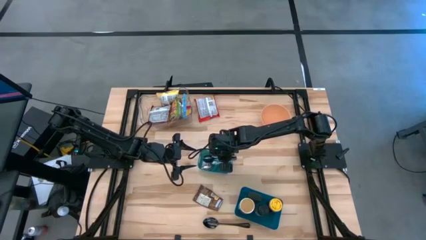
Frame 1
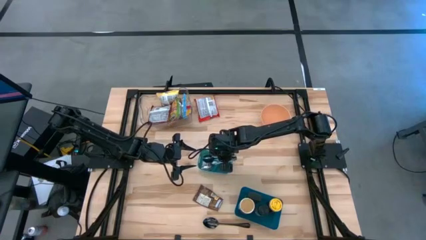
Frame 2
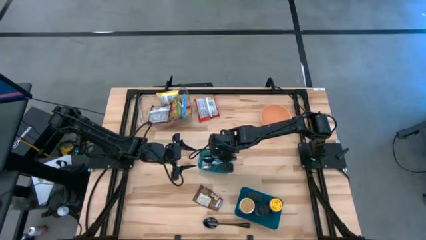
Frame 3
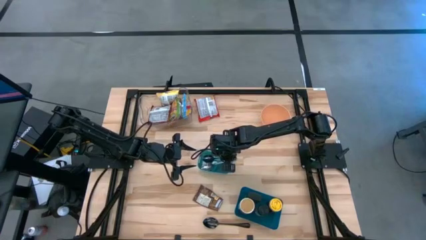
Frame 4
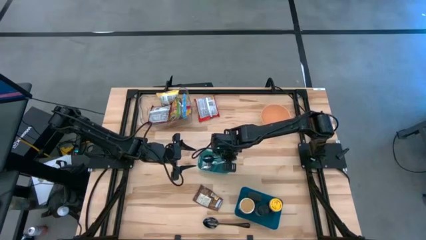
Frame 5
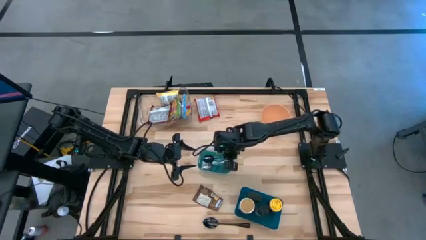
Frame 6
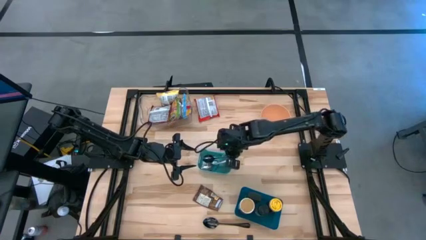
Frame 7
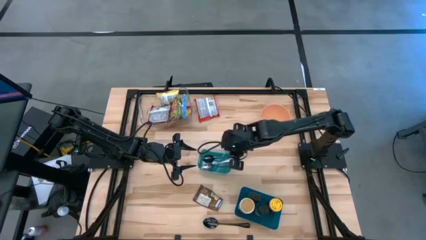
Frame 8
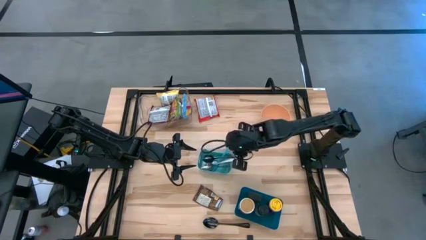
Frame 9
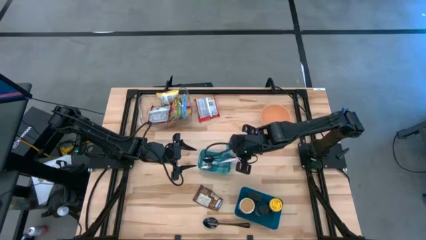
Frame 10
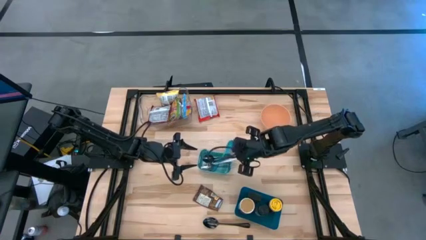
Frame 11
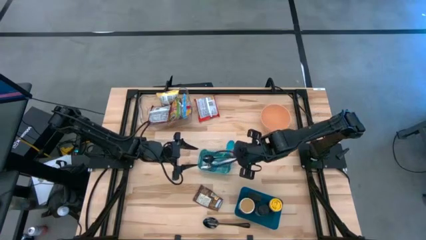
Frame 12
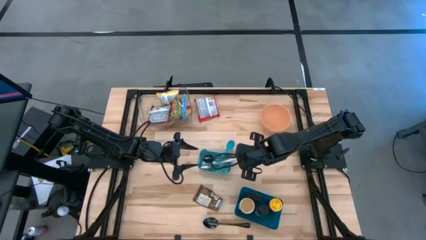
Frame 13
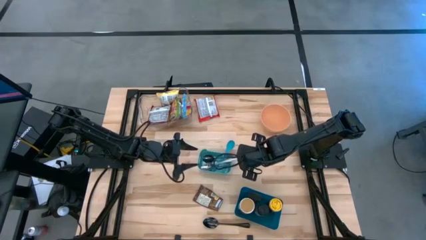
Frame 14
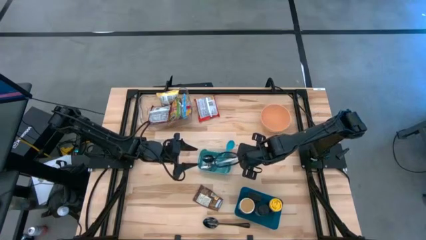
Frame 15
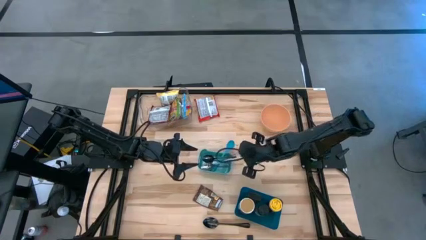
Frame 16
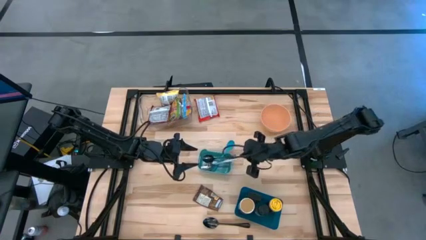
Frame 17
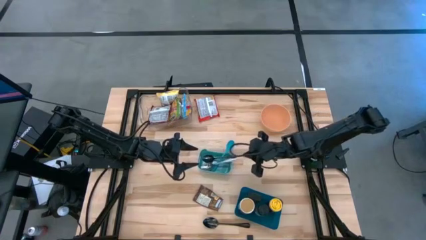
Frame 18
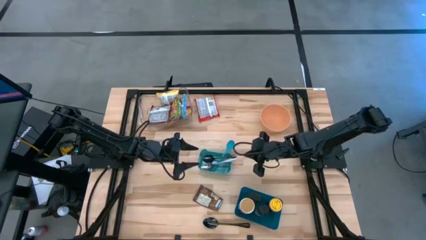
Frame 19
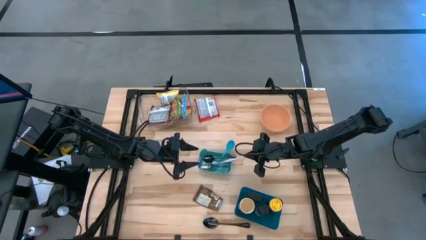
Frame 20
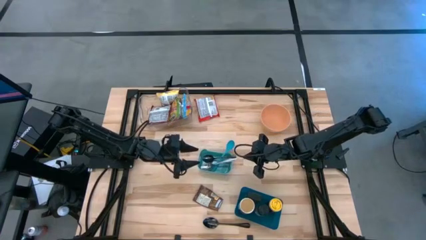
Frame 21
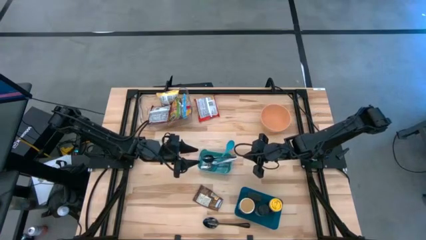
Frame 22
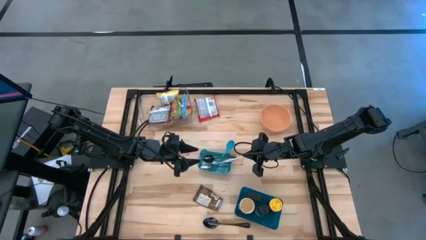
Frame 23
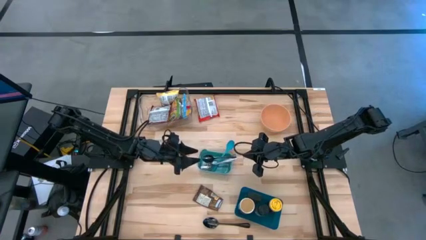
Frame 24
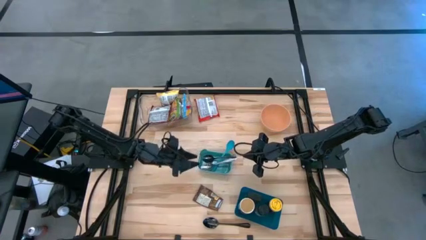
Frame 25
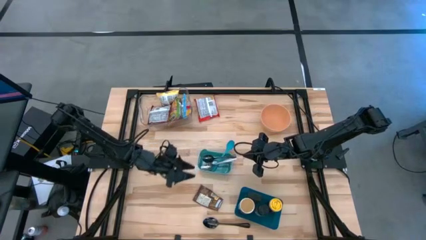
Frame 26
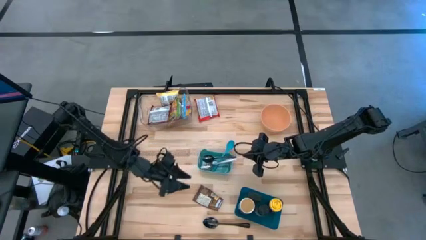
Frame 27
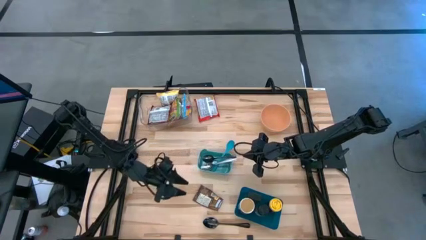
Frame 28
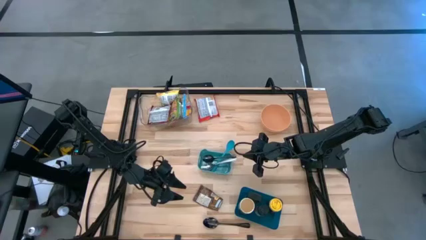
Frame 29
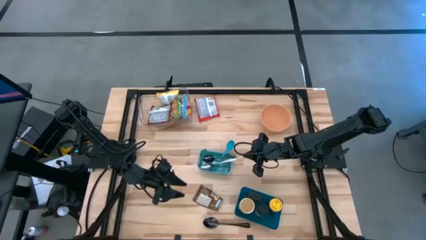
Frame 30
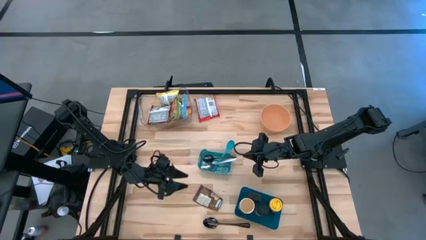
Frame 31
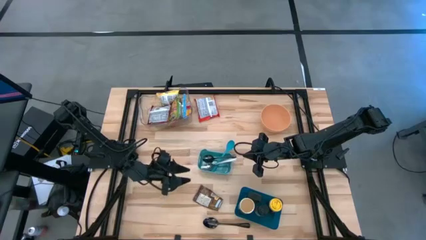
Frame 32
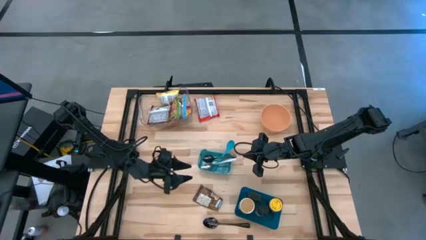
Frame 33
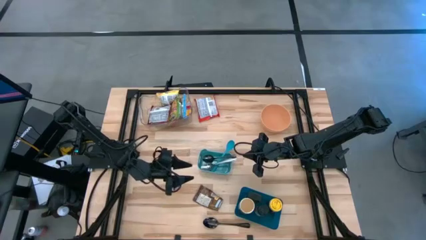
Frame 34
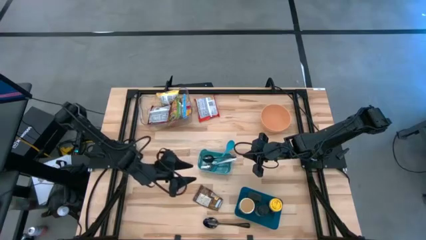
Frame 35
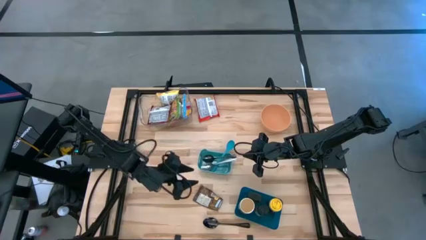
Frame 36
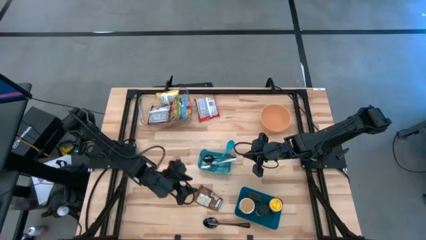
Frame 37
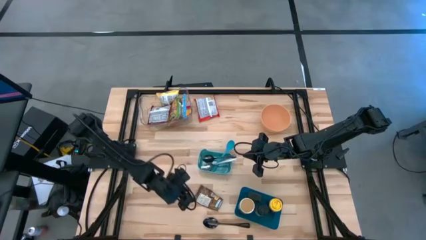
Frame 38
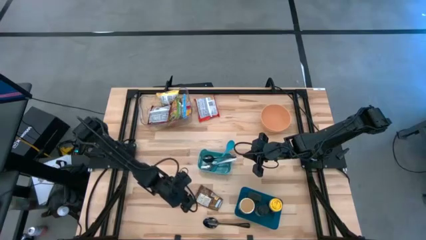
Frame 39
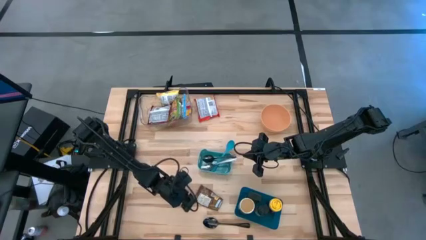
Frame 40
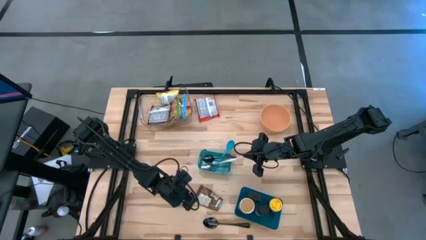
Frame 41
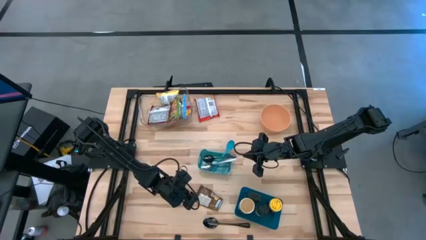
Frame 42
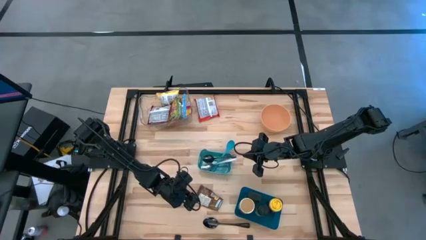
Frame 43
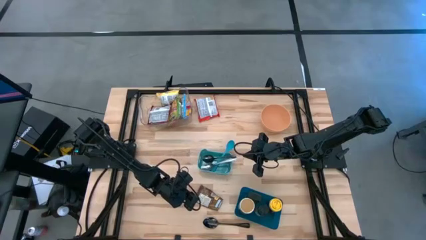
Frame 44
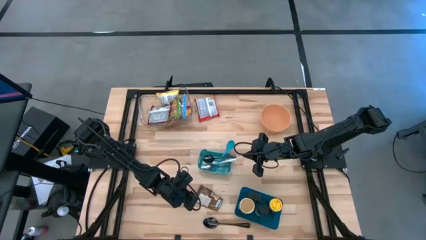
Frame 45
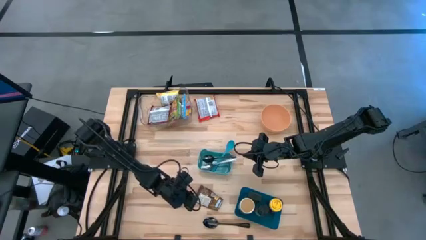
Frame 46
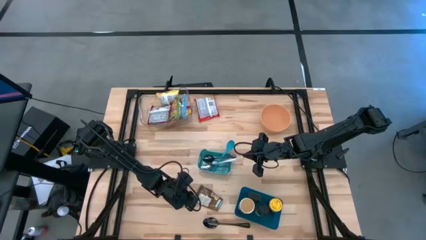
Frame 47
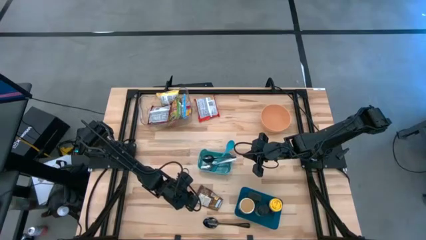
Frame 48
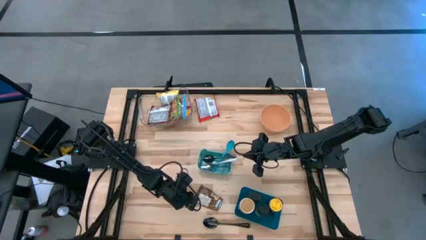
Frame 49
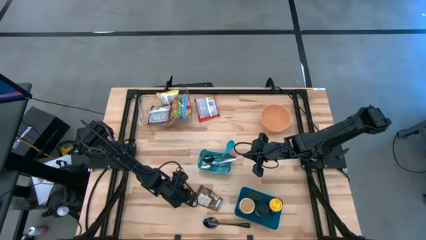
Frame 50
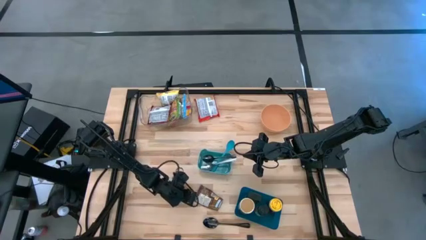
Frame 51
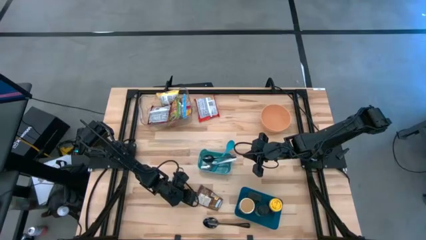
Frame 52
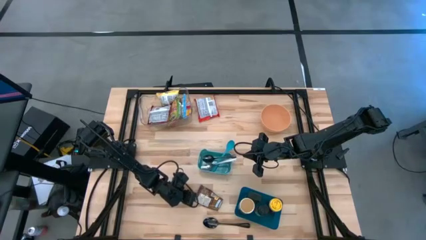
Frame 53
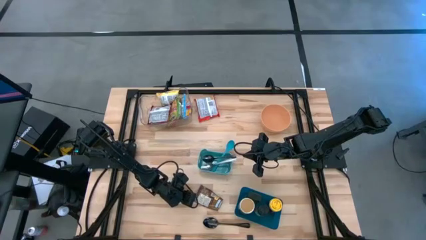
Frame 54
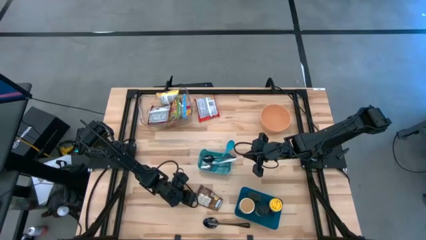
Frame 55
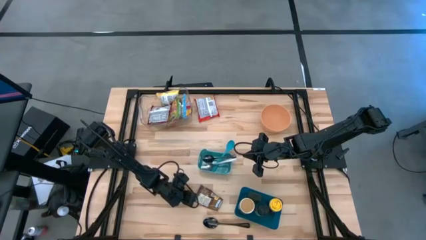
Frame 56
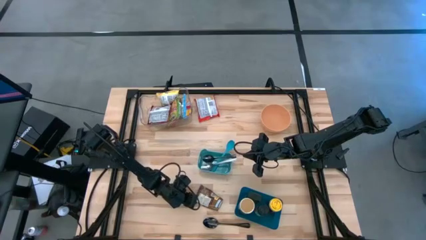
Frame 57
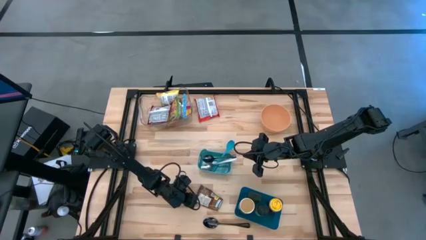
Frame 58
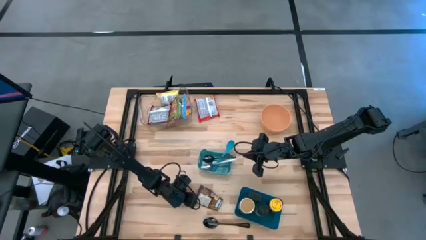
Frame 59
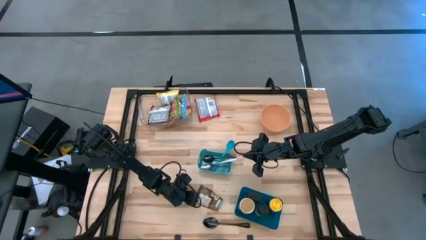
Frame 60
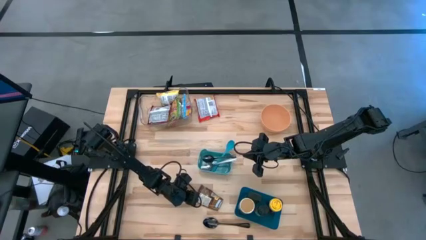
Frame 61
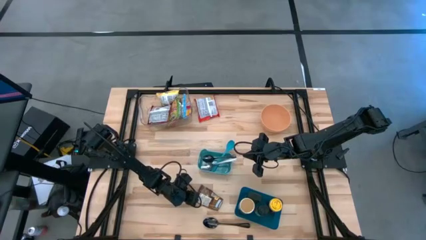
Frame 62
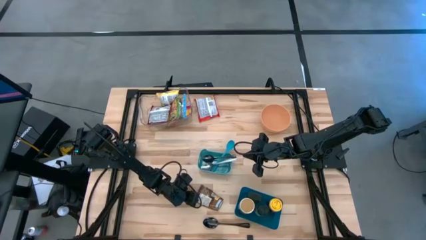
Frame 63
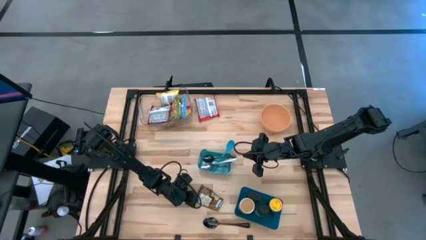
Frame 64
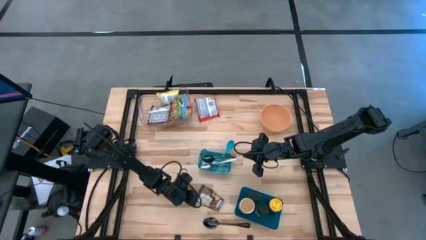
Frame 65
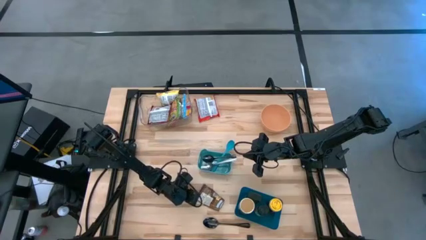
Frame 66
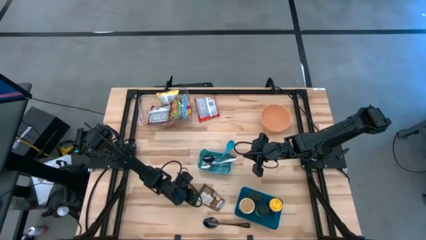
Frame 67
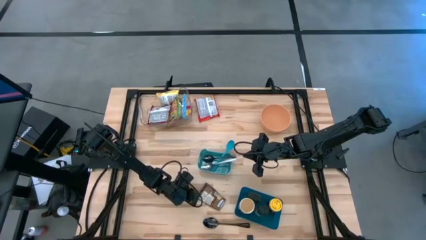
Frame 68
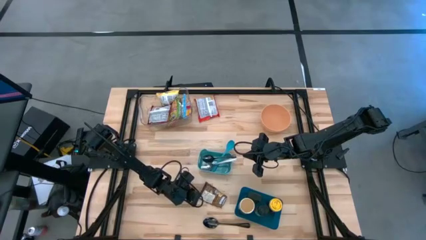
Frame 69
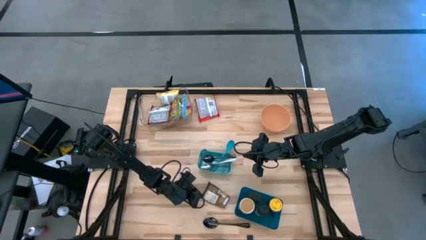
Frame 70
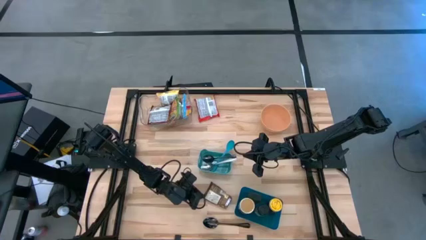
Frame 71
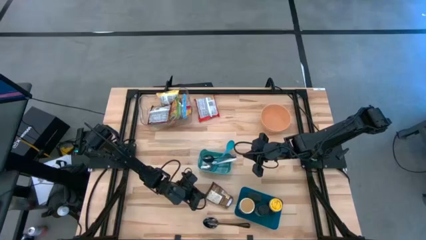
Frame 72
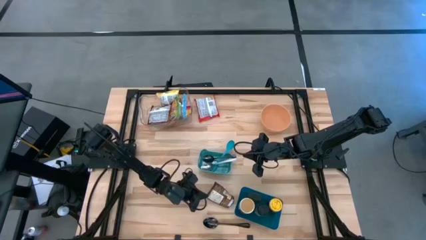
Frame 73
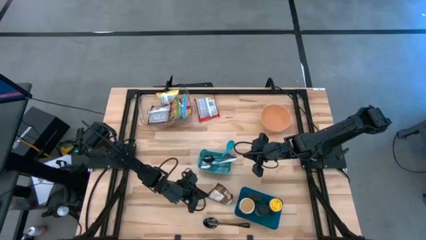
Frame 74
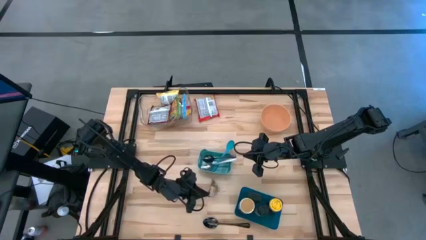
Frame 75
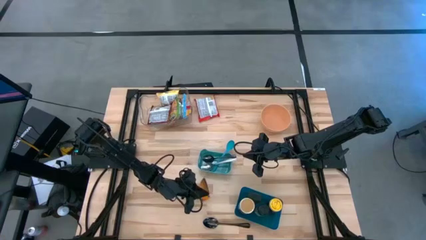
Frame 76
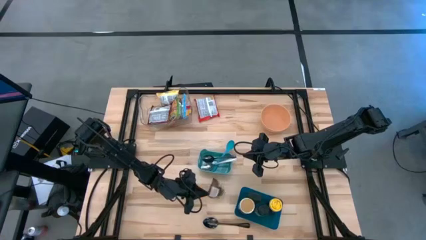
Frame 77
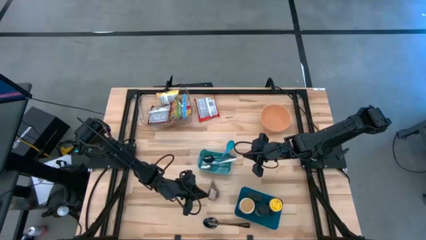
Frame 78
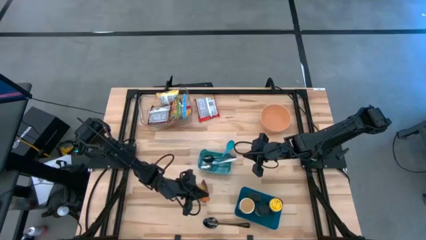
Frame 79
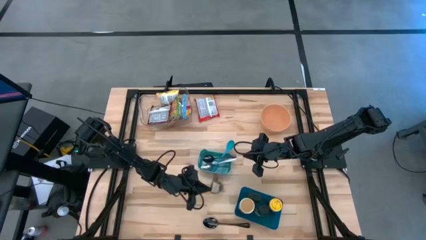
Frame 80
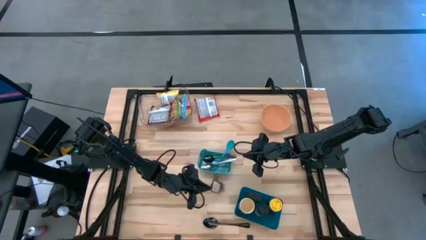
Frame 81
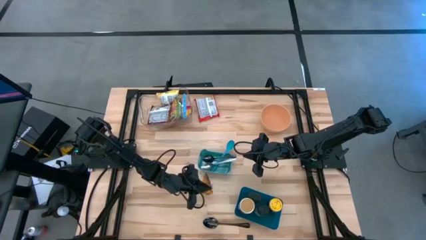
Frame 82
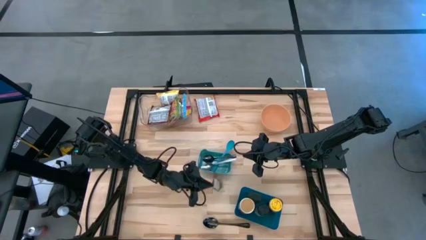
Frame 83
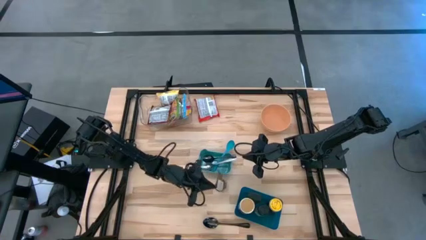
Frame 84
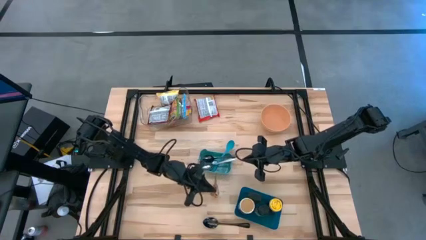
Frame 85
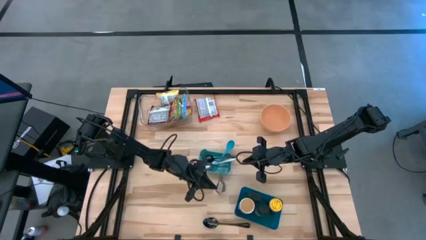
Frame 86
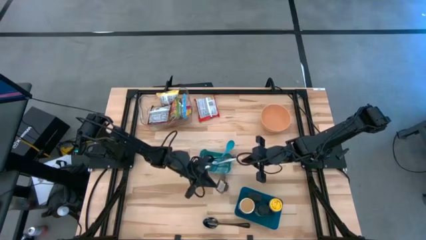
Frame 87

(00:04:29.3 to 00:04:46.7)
Task: Pick & Place Food Item
Put the orange seasoning pack into the blue bin
